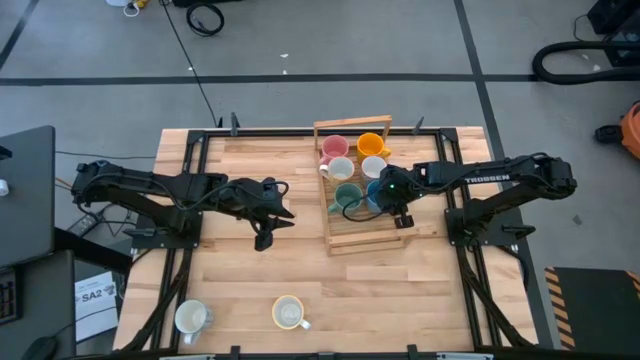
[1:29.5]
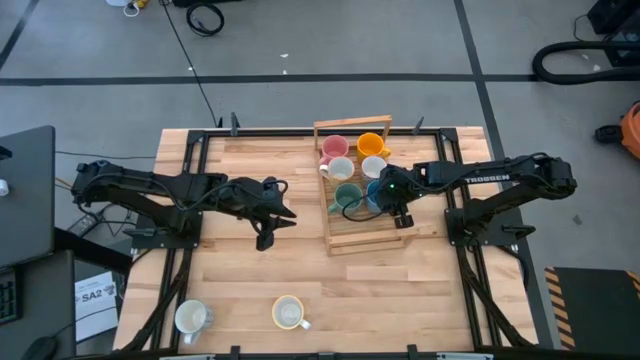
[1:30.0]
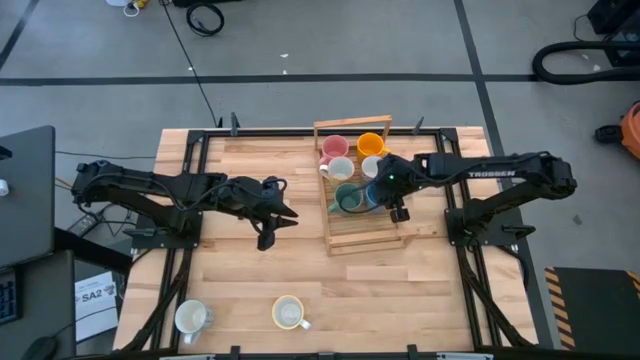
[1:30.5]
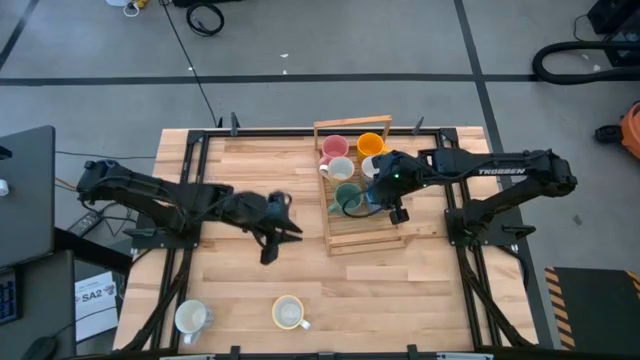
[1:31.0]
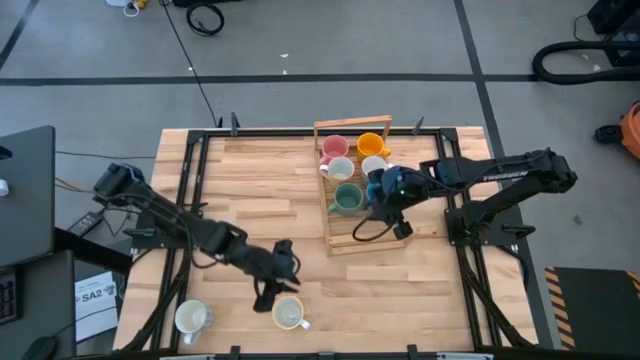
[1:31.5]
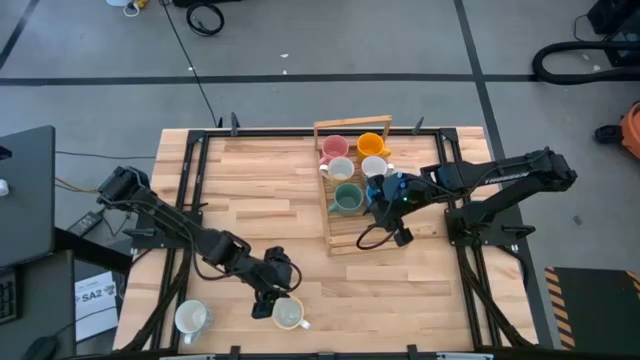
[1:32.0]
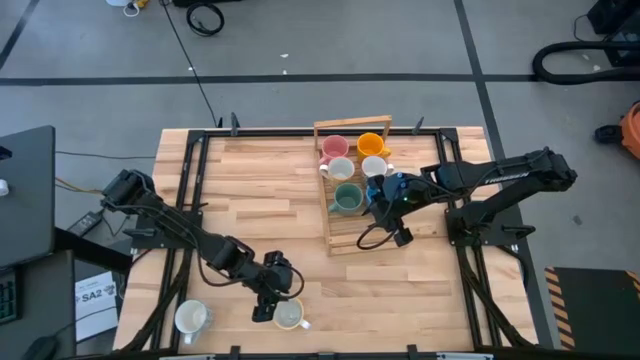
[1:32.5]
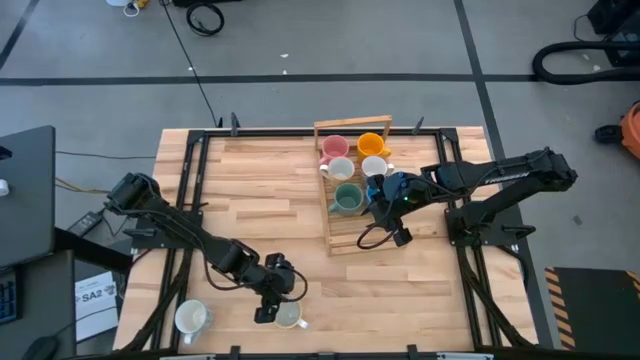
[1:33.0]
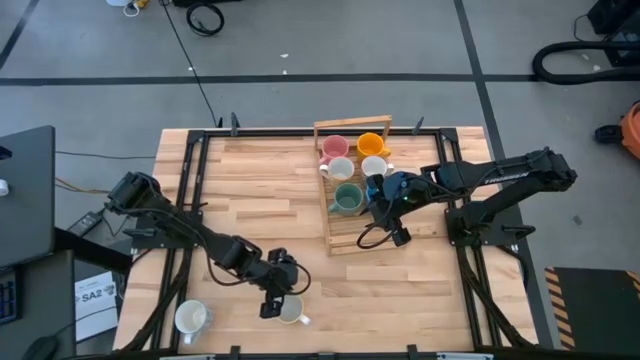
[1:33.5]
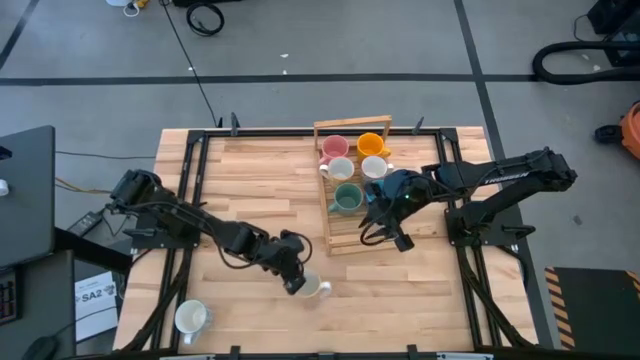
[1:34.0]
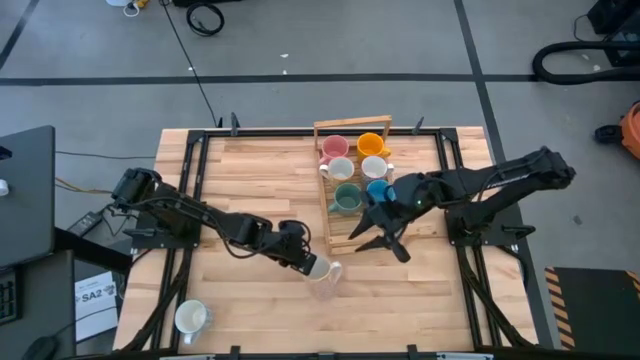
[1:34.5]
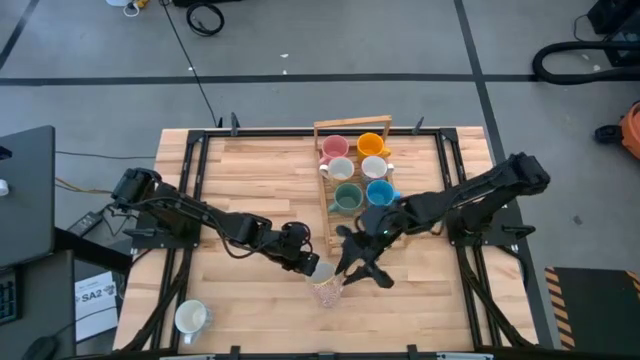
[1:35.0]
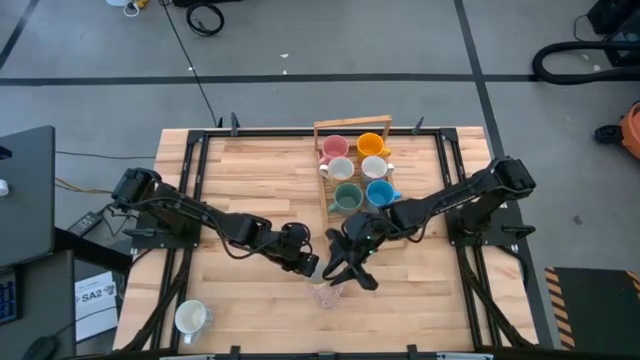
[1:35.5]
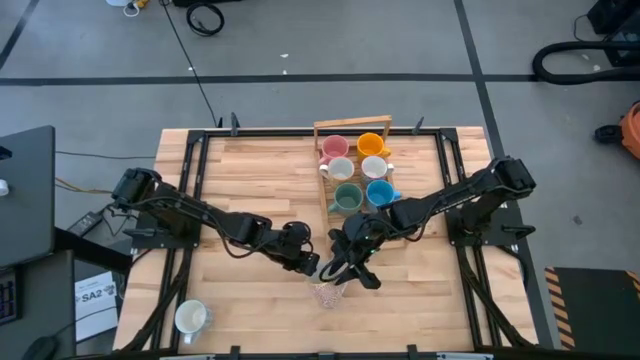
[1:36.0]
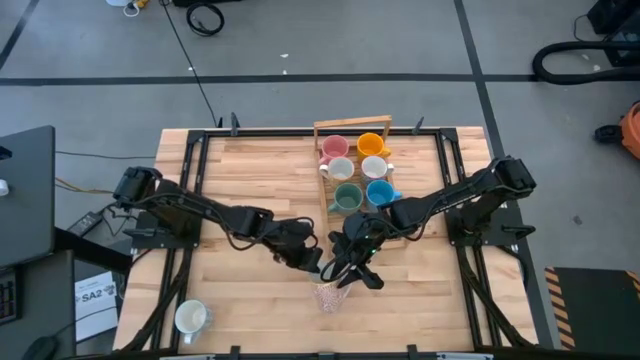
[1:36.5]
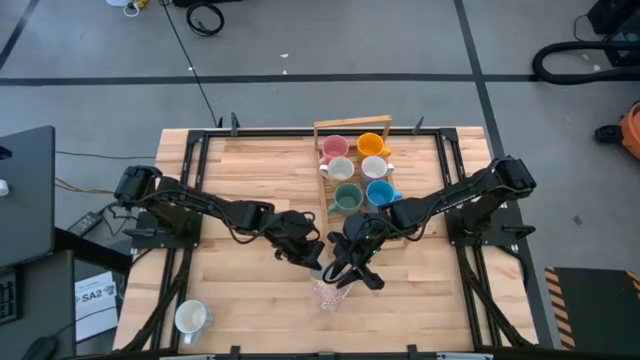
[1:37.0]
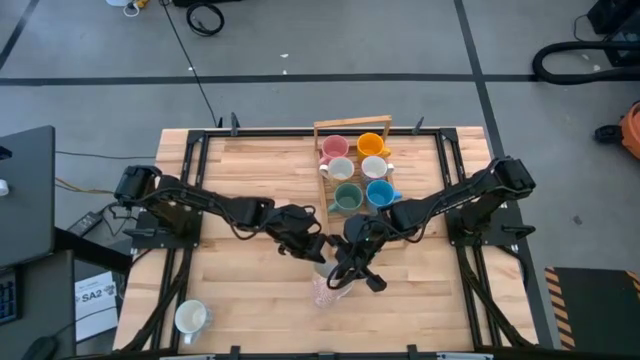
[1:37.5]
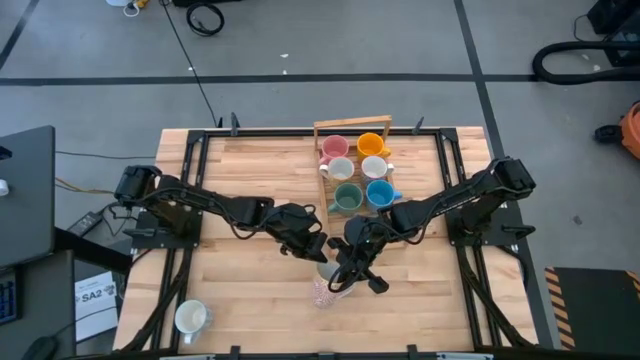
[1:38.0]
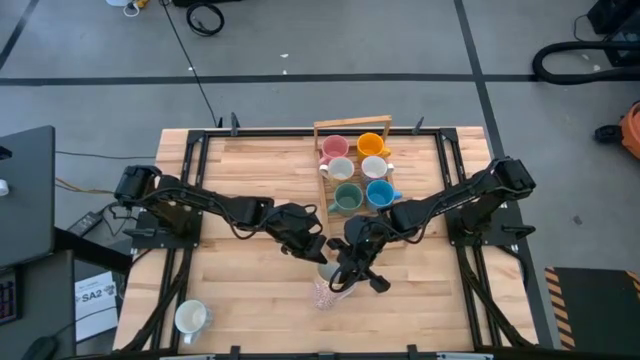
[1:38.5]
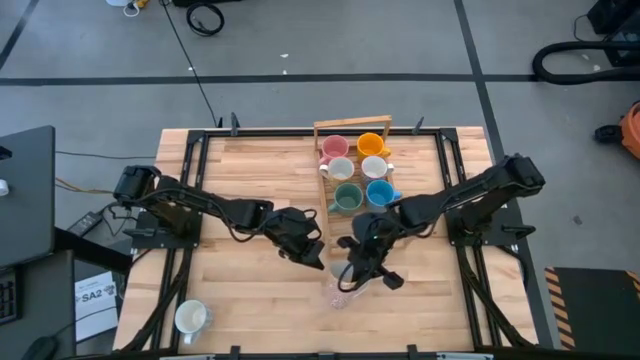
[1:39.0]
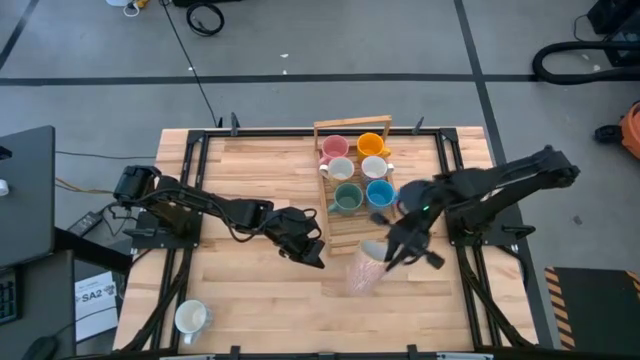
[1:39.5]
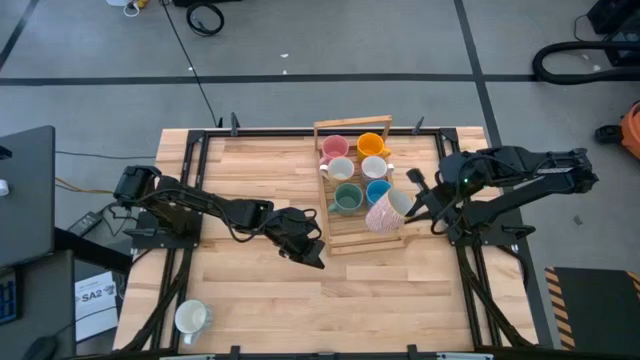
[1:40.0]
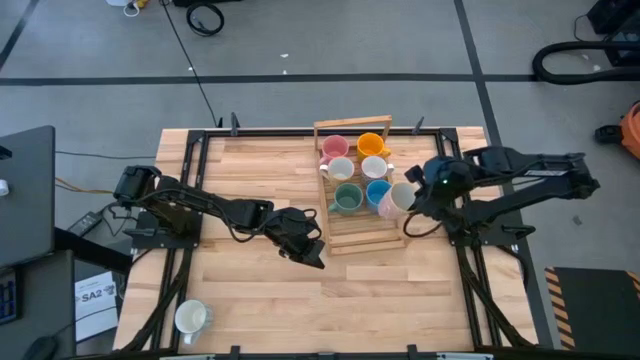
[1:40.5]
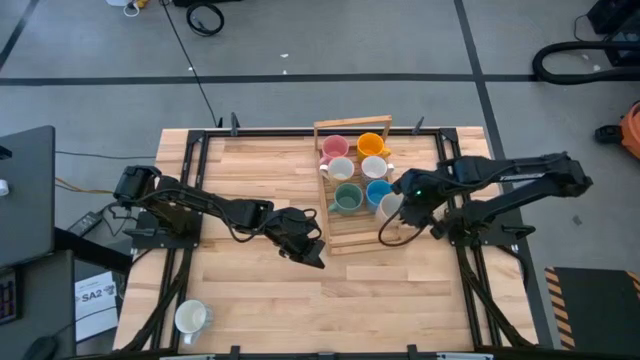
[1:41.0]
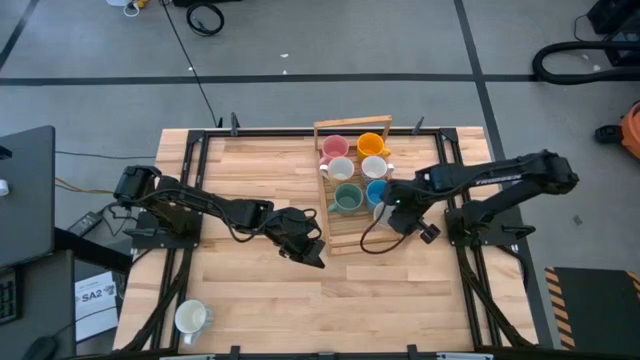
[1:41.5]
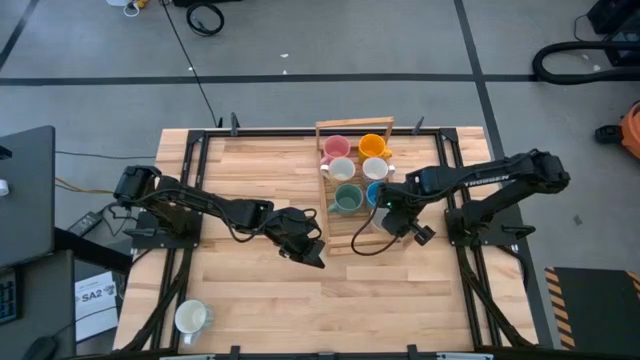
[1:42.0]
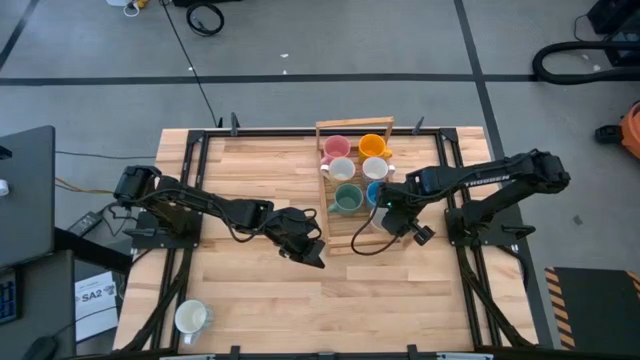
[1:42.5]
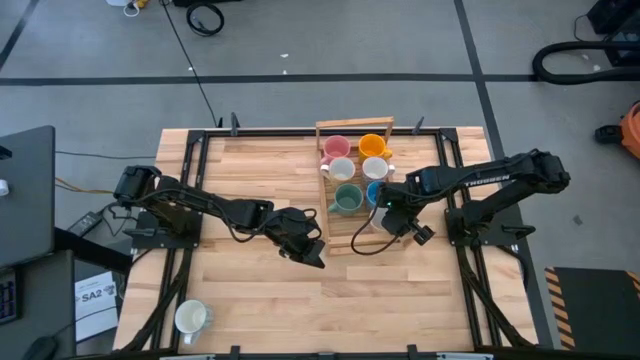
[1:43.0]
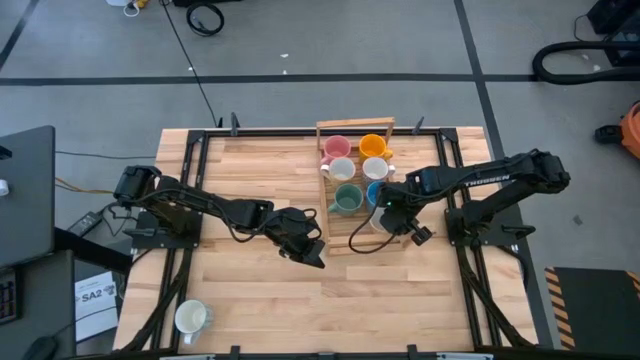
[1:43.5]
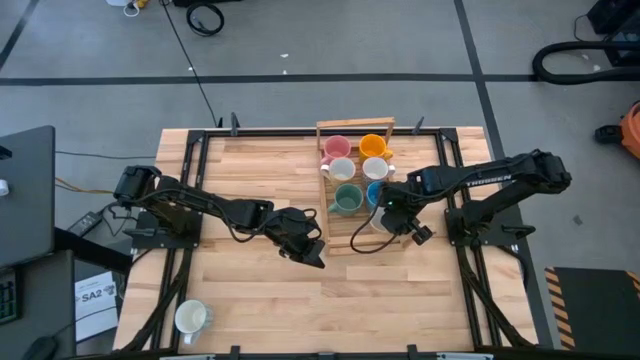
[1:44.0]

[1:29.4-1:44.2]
Task: Place coffee mugs
Put the orange patterned mug on the shelf

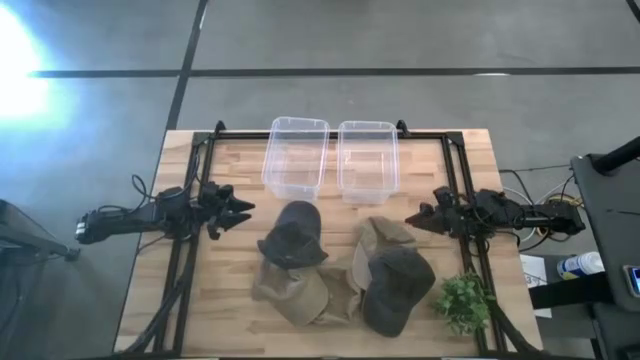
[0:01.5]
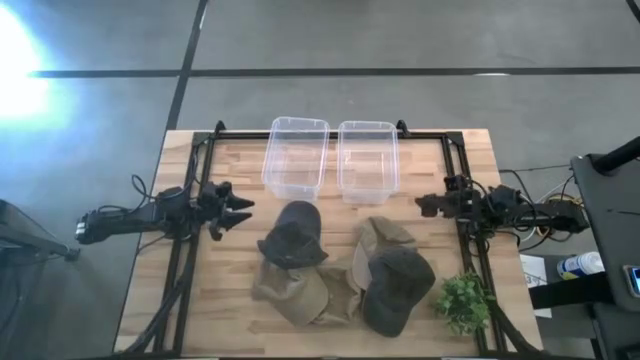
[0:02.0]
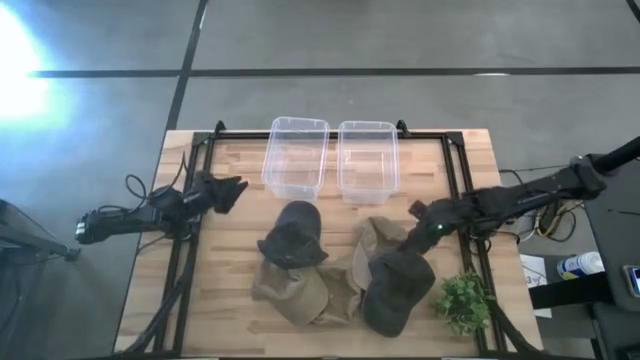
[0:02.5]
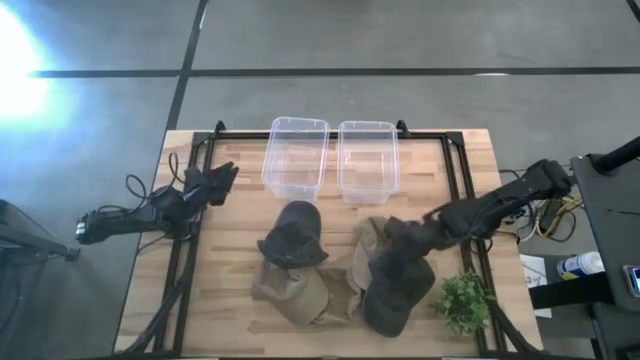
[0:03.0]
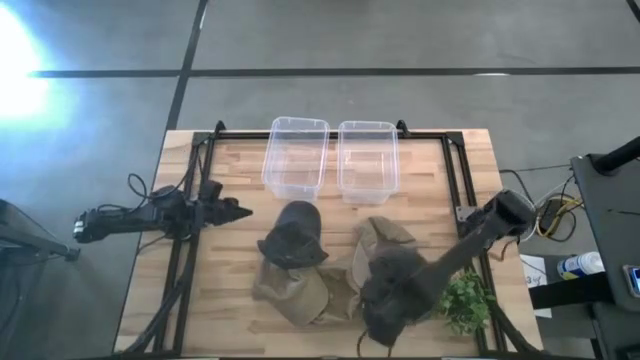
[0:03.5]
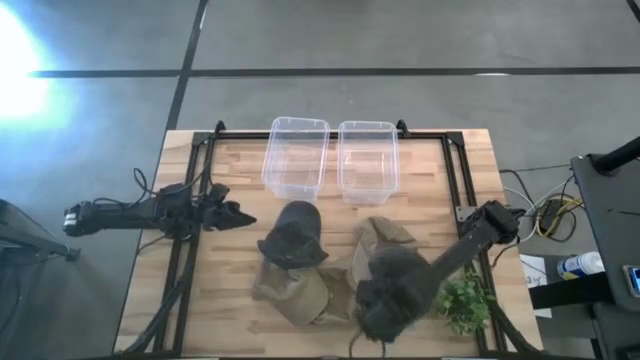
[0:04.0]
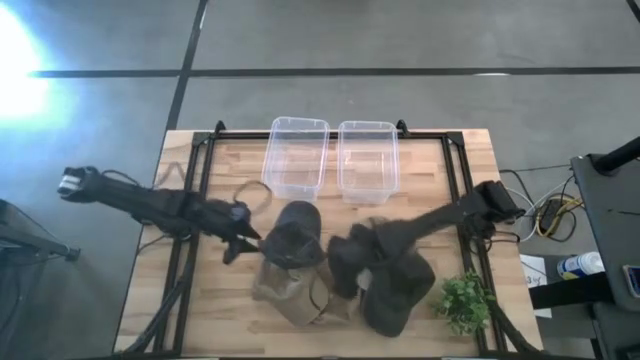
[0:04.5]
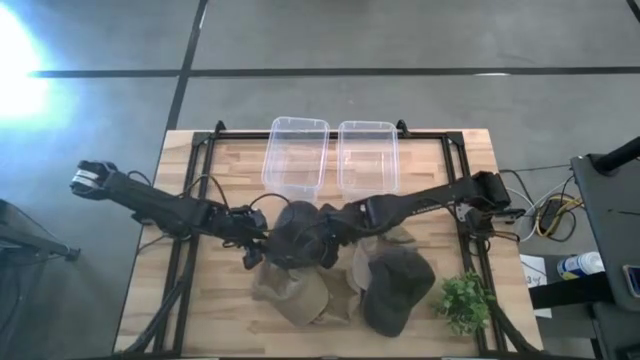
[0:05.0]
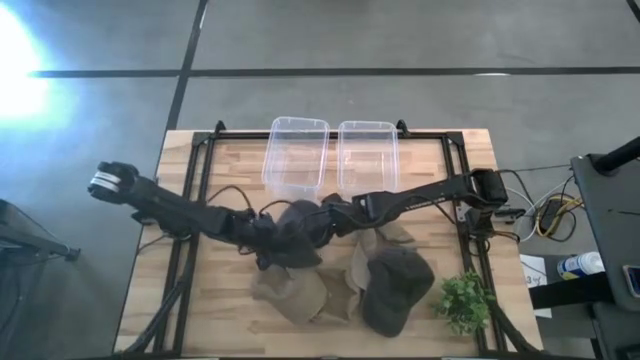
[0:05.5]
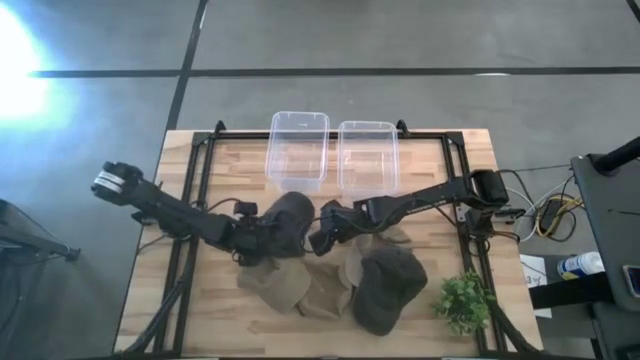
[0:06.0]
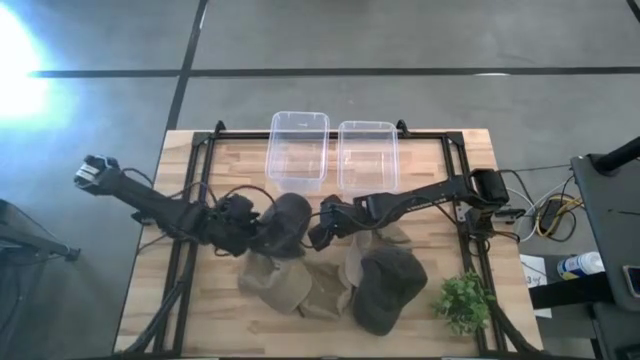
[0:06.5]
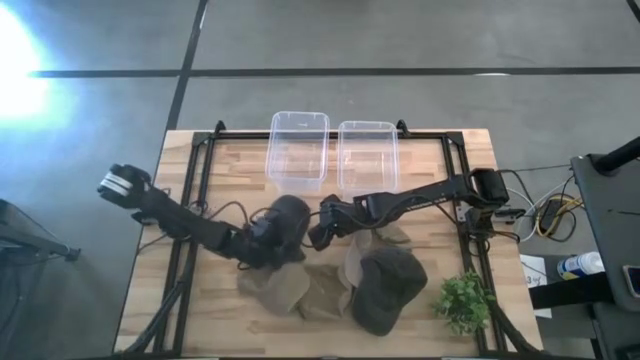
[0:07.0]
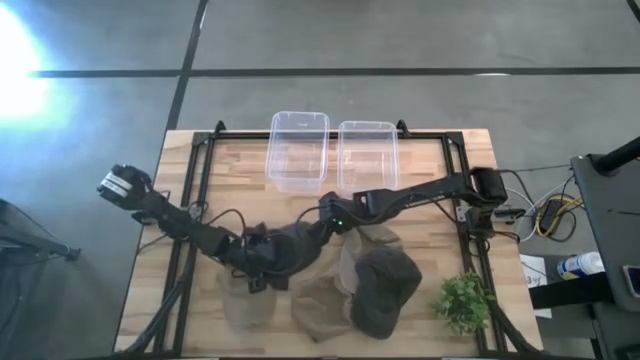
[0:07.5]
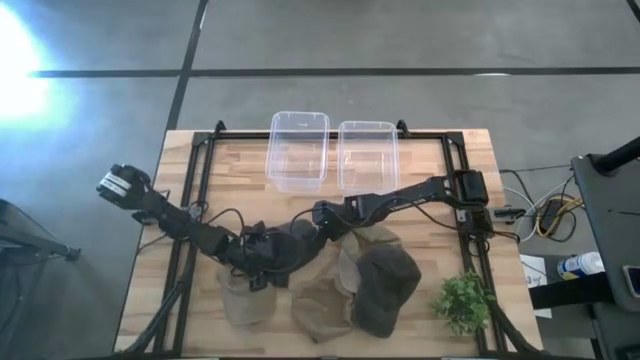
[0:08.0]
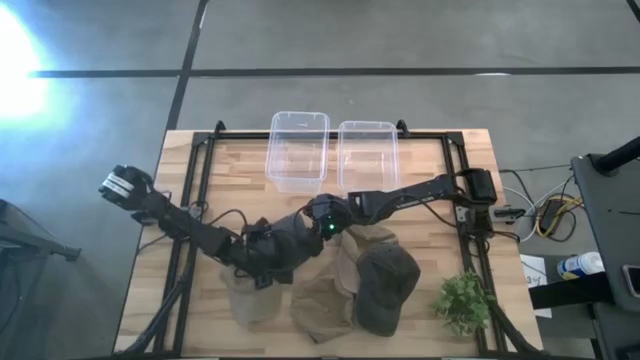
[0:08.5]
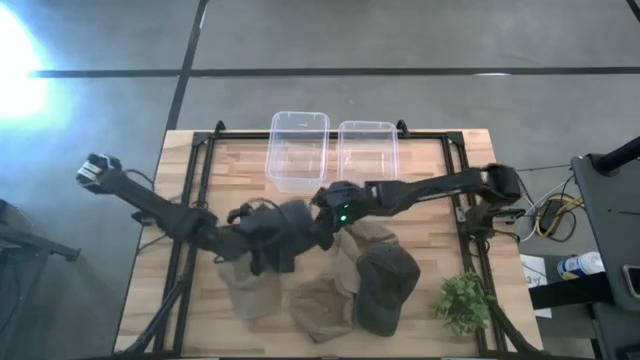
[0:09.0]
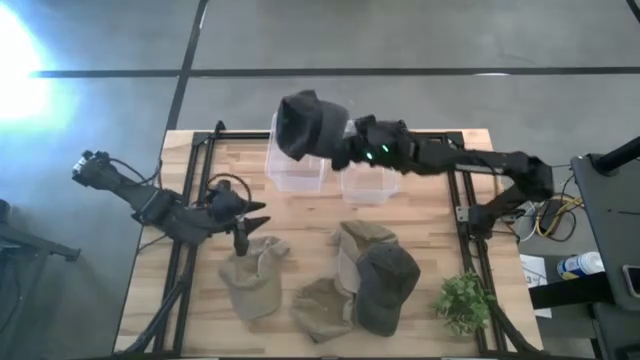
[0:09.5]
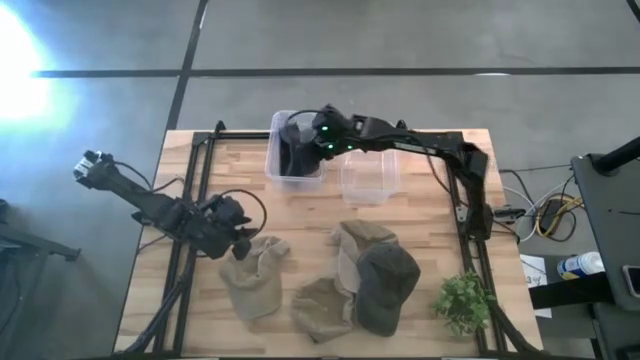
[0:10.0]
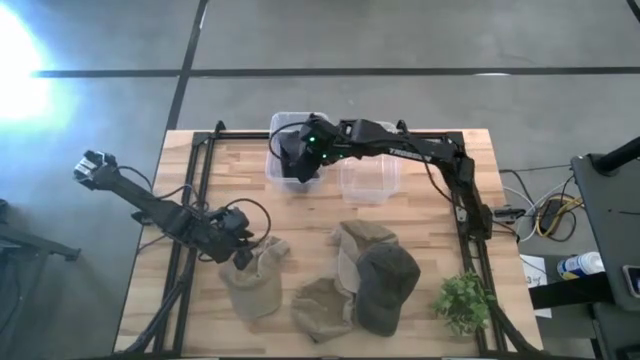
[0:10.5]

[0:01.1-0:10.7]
Task: Pick & Place hat
Put the left black cap into the left transparent bin
